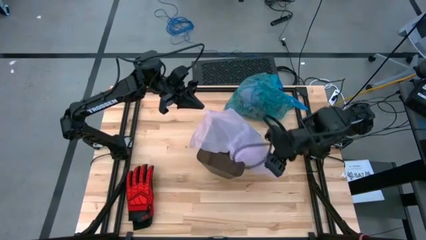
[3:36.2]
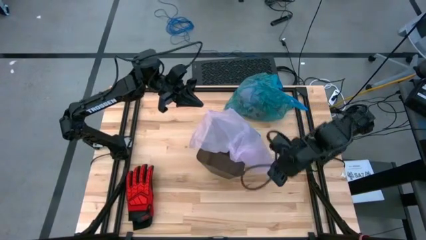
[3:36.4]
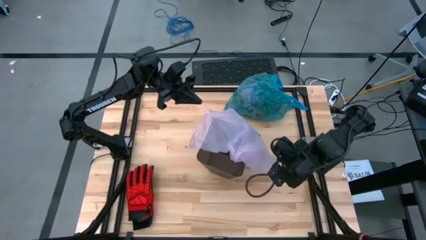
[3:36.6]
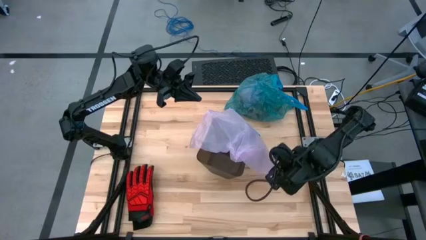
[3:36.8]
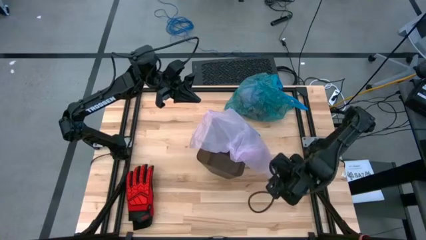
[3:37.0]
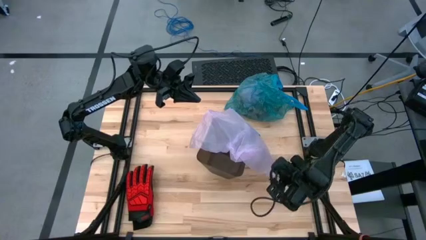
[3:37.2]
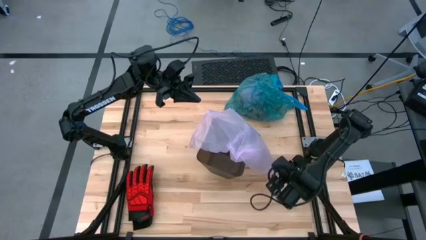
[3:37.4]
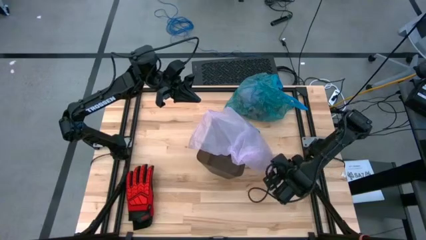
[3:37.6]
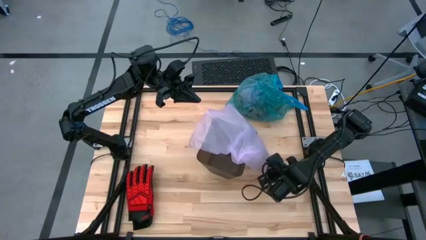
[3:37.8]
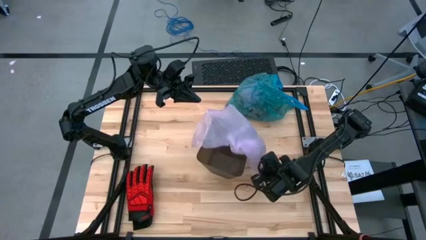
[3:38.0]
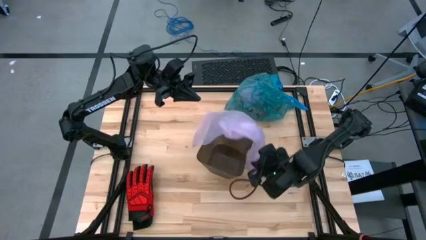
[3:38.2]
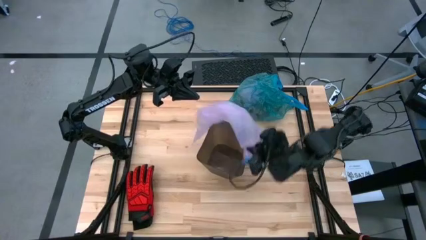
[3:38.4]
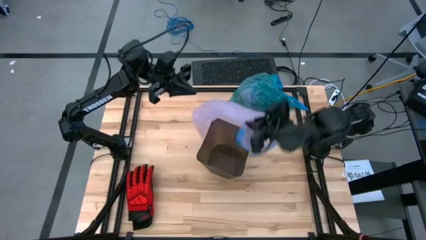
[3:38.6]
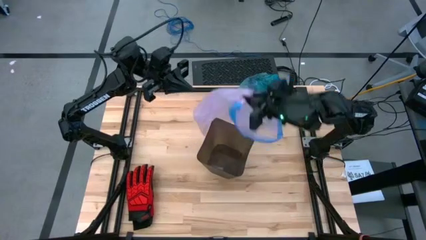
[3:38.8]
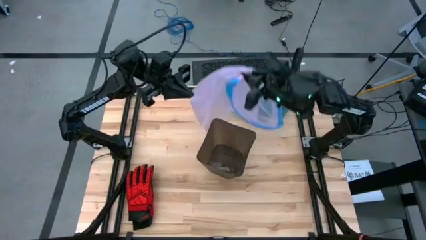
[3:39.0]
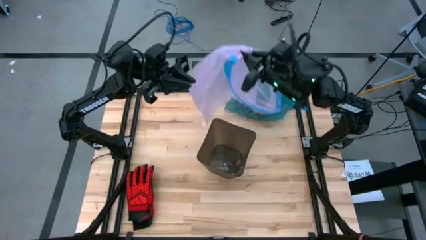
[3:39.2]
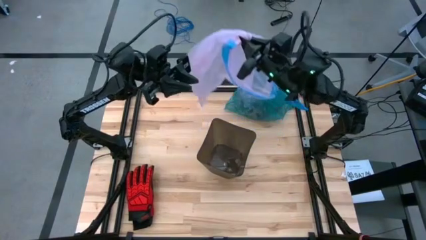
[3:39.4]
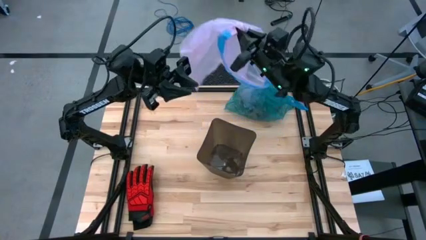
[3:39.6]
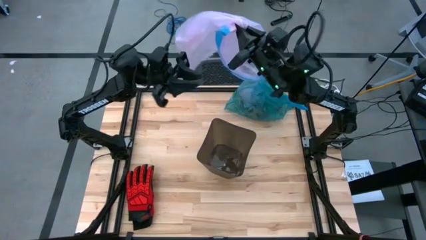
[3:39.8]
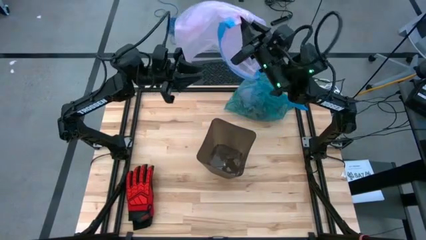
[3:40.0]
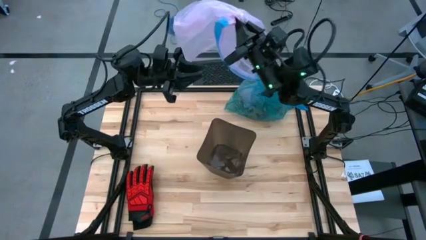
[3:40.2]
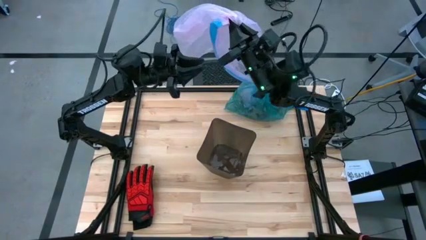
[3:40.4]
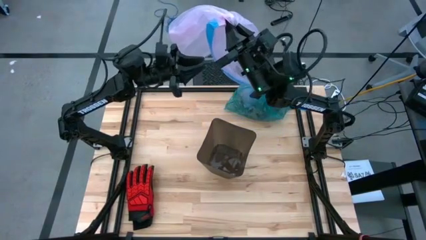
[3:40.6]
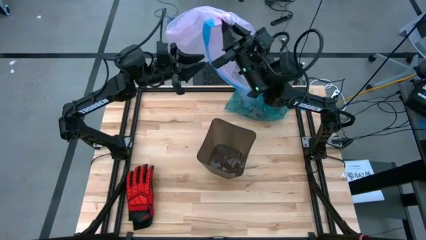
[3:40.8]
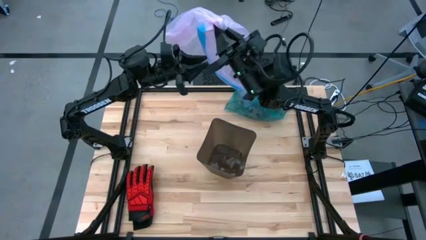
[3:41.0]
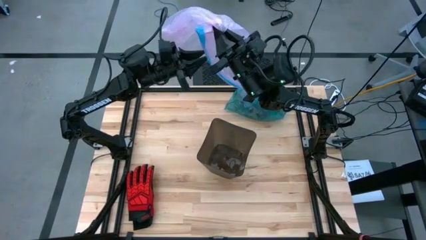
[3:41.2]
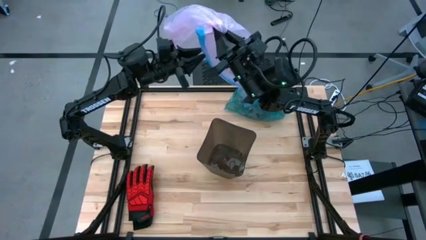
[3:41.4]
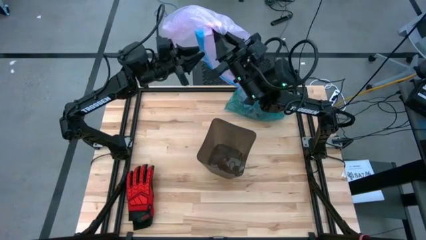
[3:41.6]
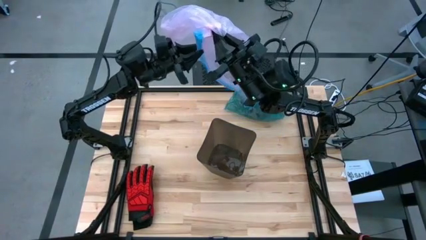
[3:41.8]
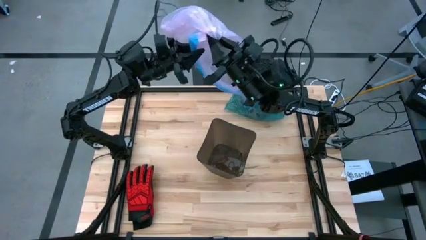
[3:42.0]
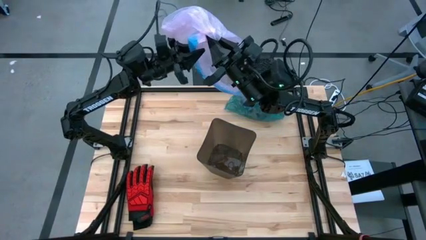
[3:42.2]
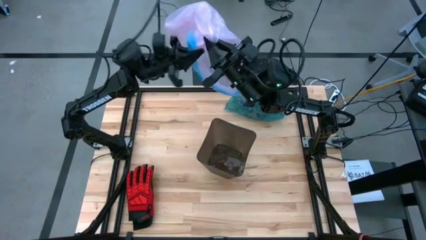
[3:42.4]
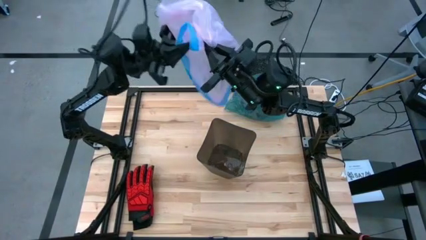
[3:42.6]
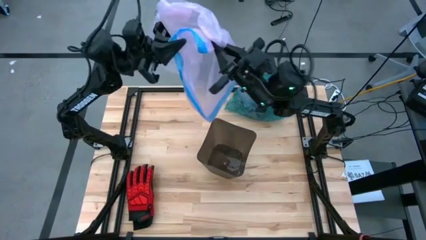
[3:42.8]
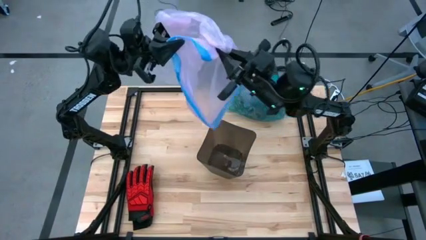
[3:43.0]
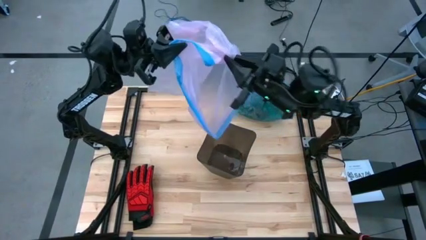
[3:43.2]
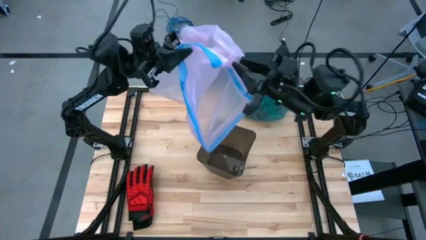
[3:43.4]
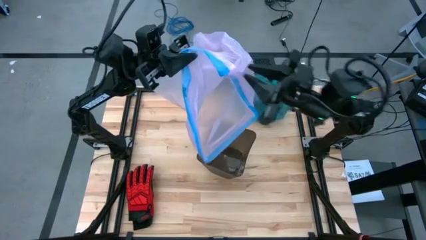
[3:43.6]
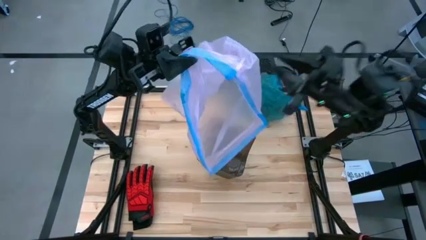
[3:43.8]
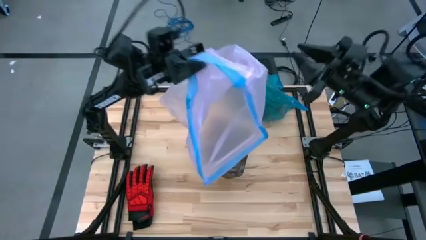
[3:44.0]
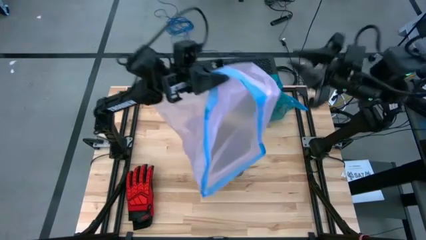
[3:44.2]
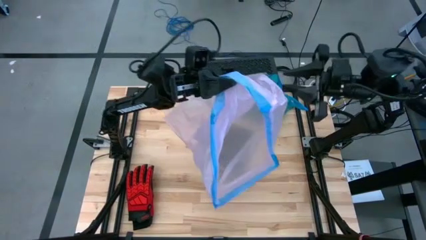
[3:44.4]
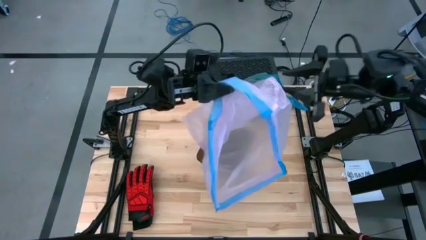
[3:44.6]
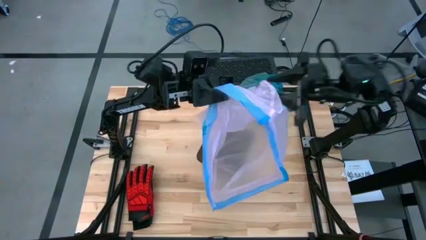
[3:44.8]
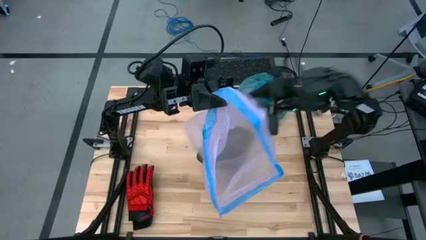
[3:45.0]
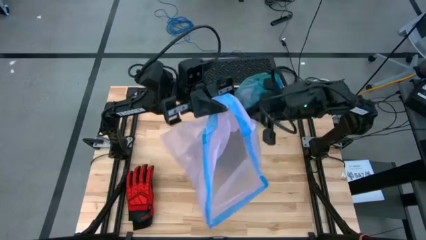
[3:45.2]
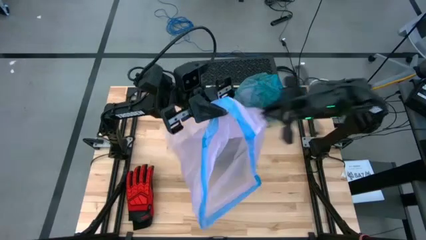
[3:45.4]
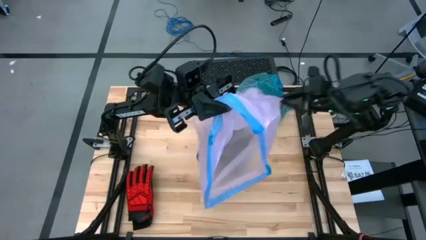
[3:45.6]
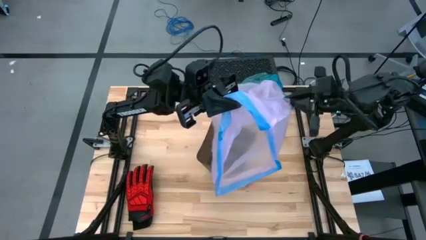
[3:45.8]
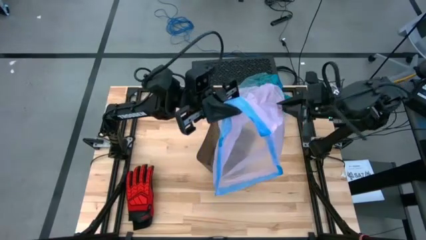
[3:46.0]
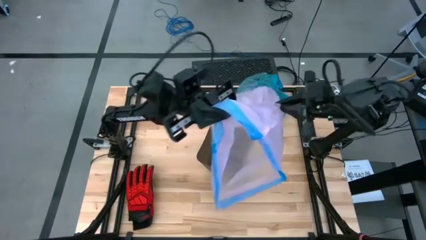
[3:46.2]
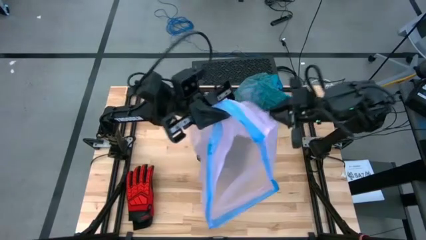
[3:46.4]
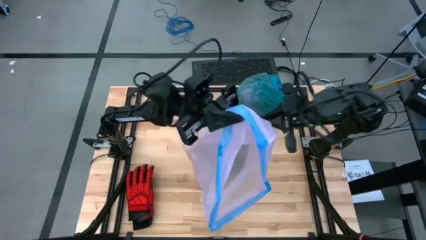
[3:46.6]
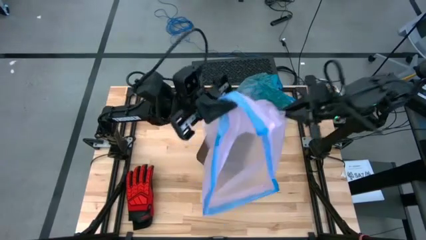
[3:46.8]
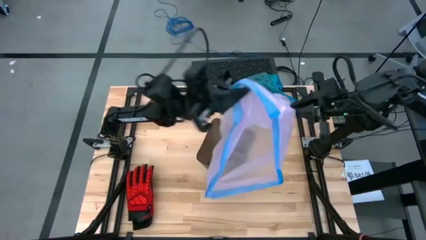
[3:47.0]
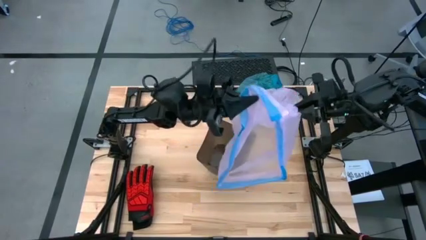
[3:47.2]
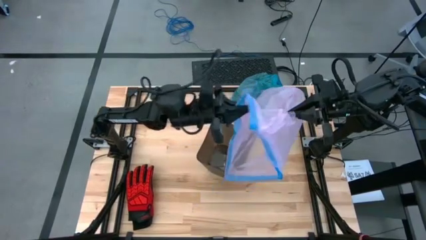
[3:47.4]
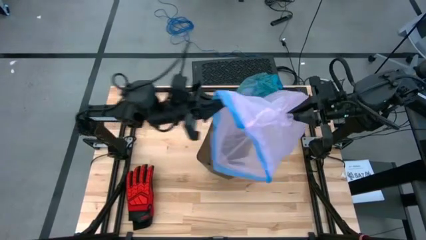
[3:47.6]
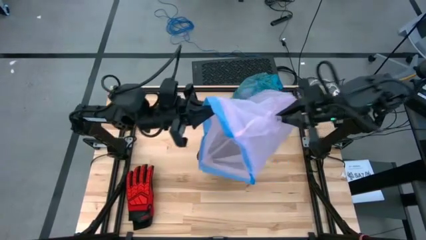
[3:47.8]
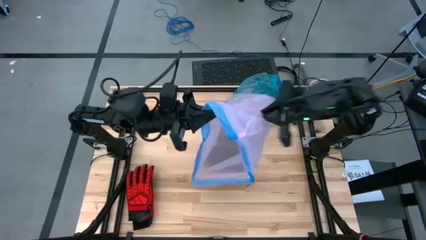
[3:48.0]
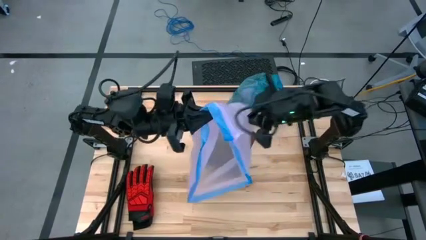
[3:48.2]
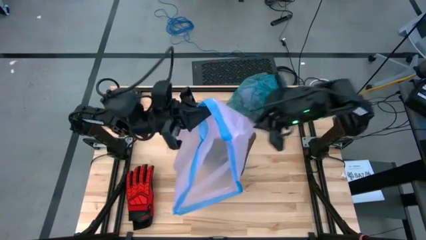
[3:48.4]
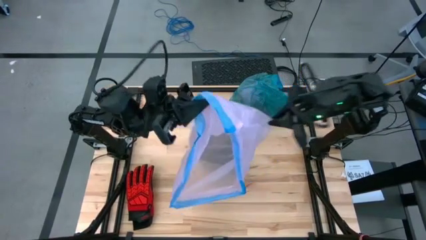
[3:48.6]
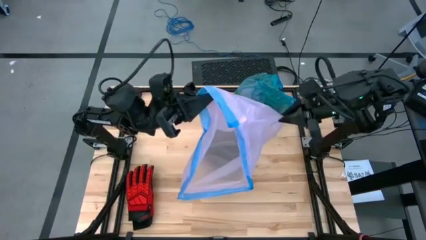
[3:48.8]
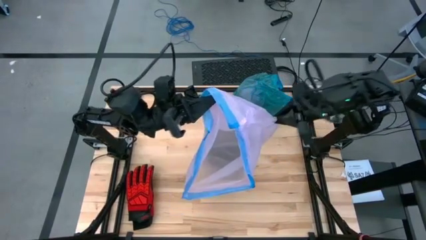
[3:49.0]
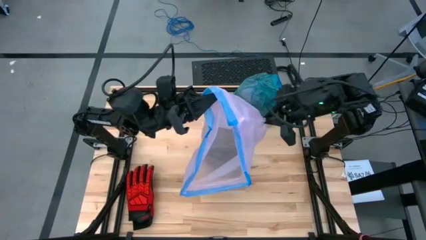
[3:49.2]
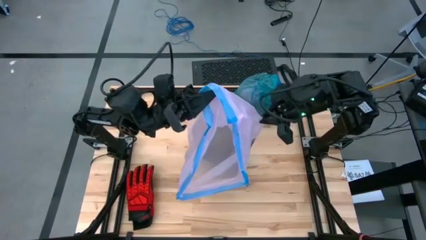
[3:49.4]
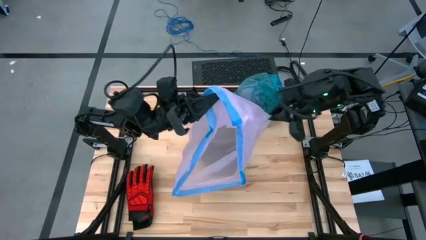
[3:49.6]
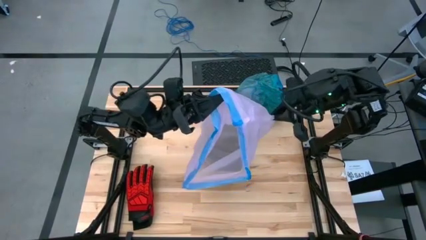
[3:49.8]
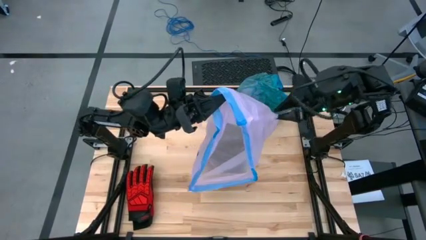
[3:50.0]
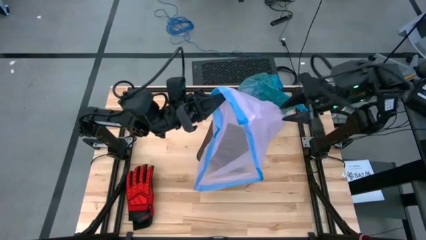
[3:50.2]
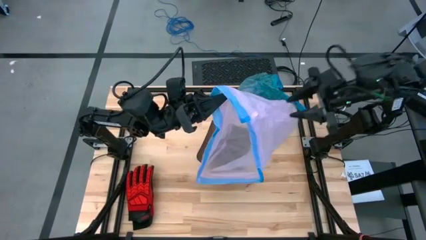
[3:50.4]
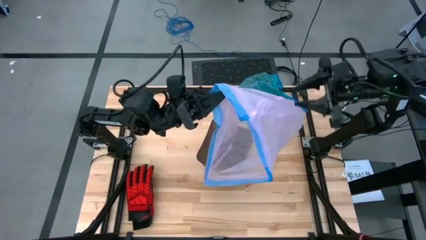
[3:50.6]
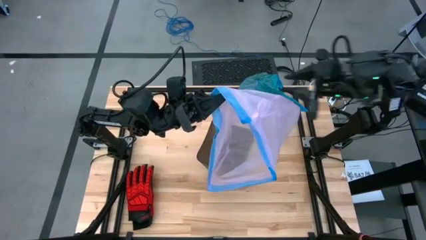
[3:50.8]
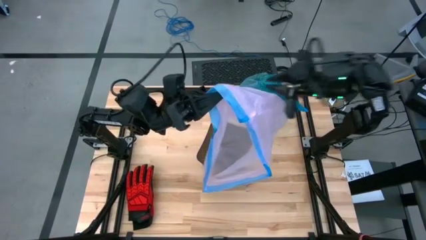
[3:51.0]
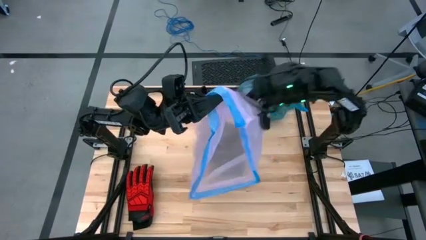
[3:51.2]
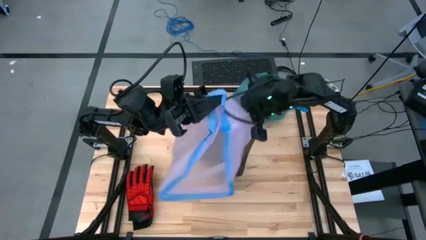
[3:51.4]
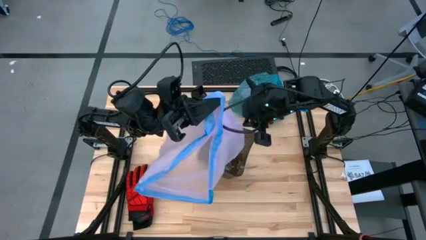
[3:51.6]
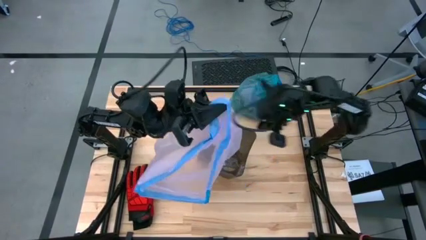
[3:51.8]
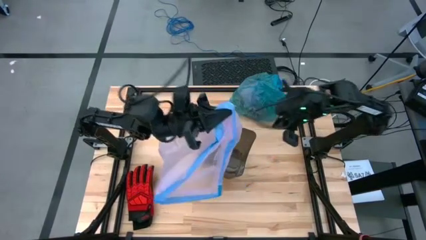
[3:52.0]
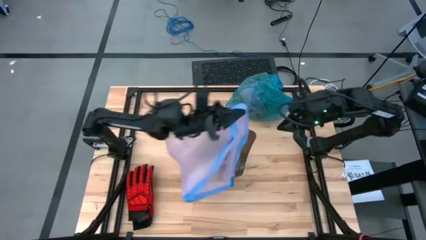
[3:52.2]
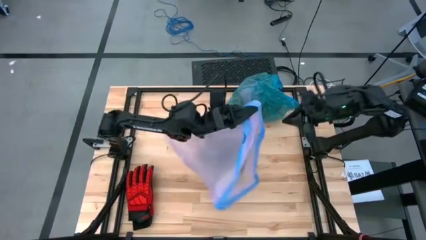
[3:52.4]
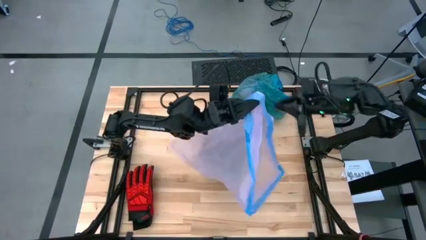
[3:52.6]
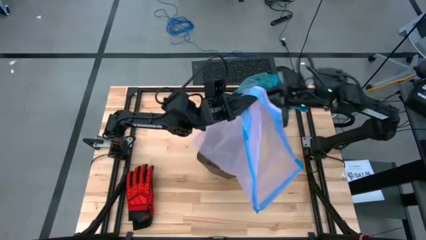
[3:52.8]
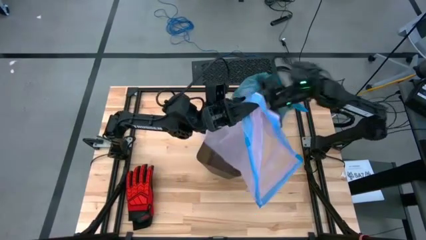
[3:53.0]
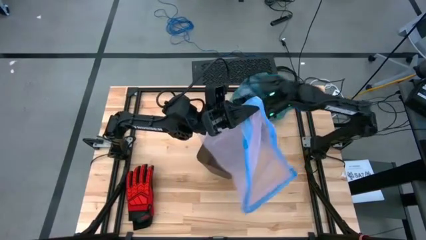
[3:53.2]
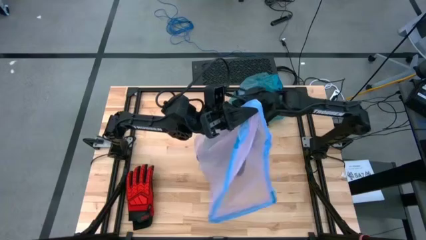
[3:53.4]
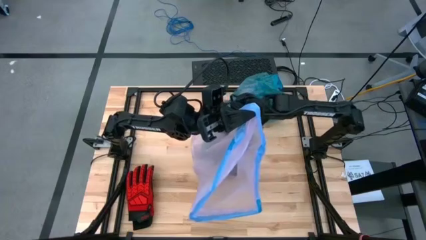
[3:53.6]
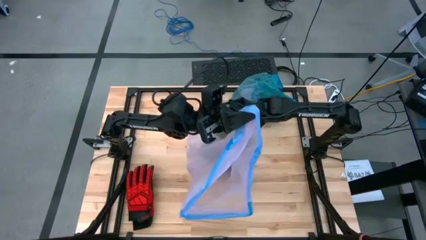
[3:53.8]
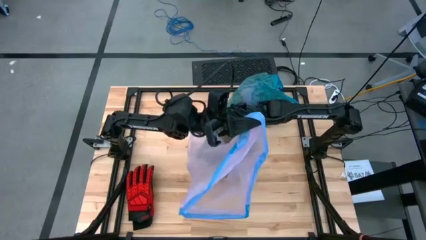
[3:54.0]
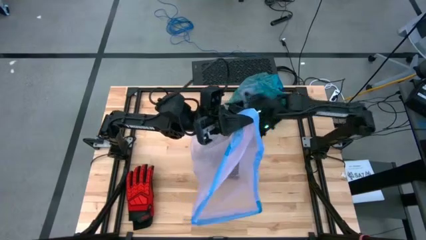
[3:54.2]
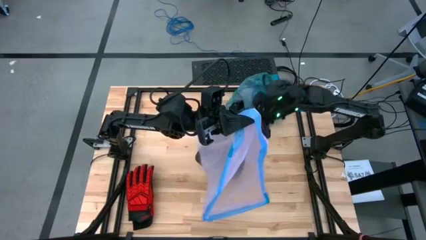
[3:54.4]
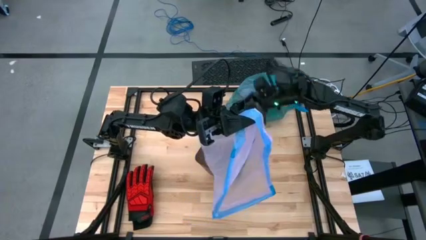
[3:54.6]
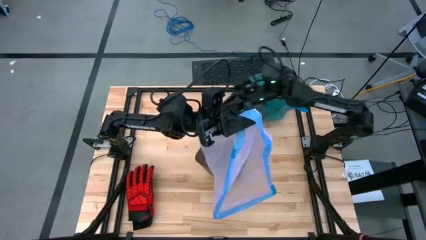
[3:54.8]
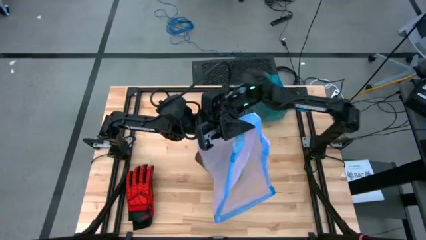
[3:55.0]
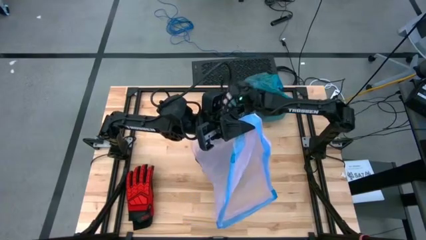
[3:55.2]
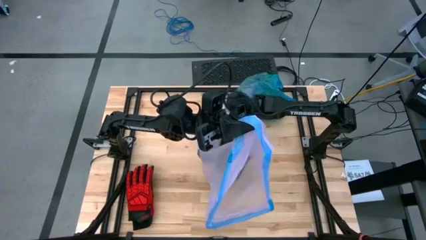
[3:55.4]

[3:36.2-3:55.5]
Task: place trash/remove bag and relplace
Put the pink trash bag into the trash bin
